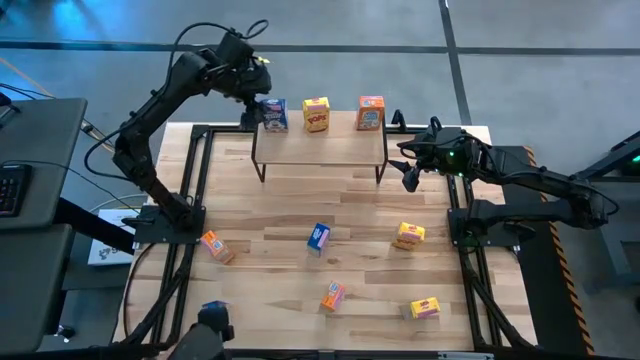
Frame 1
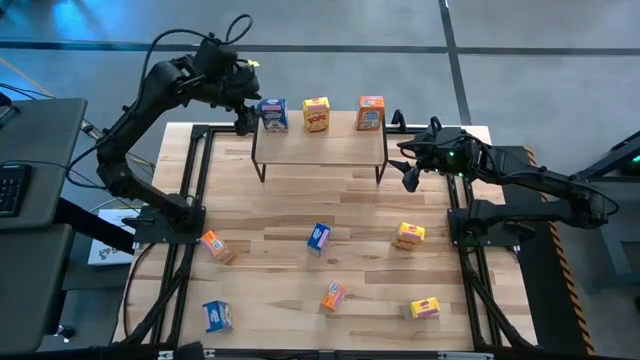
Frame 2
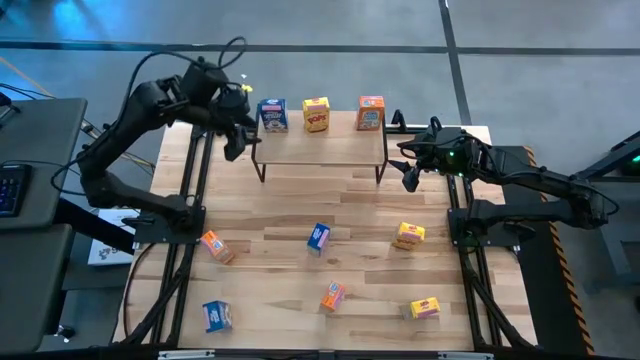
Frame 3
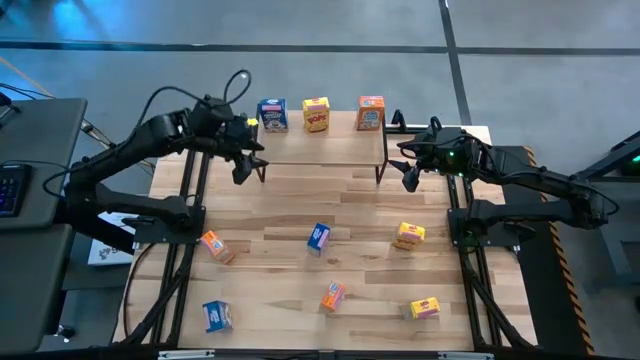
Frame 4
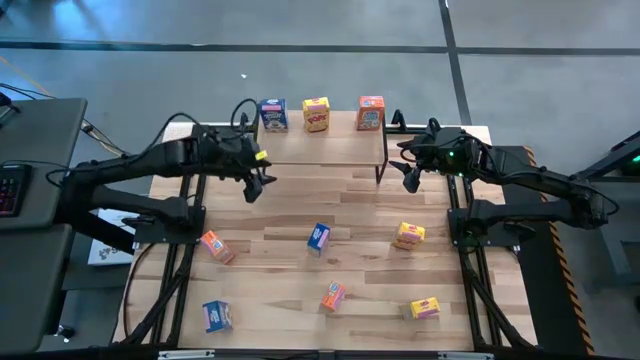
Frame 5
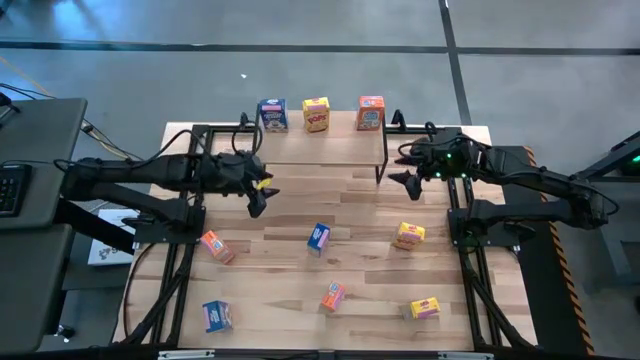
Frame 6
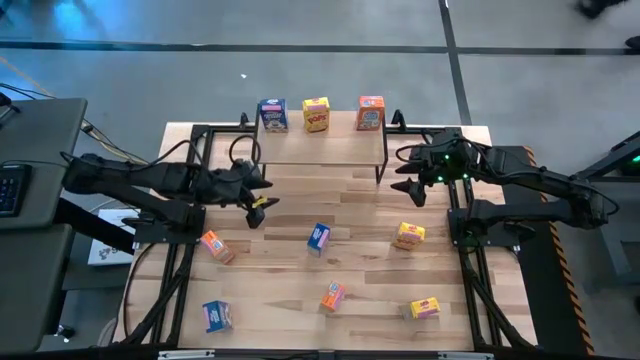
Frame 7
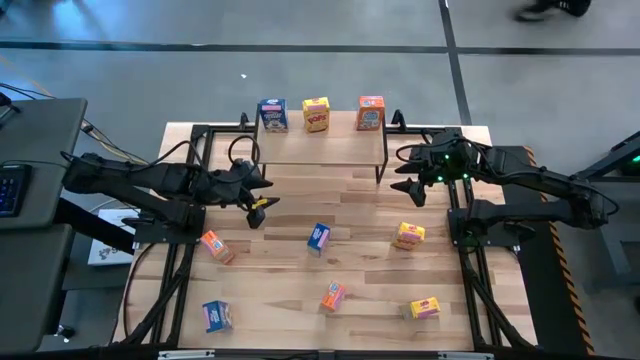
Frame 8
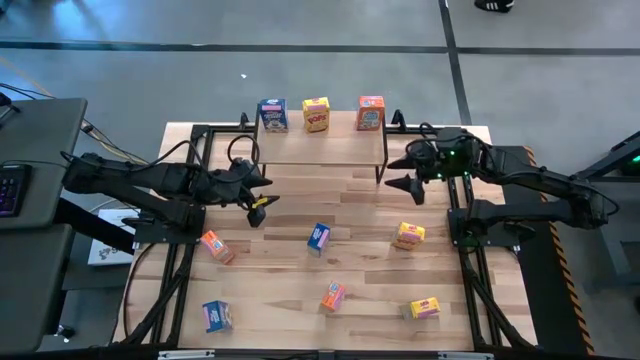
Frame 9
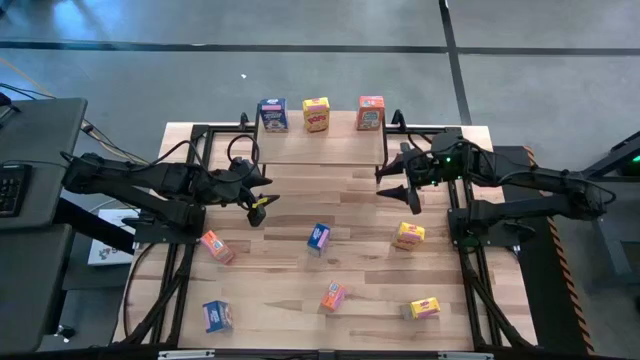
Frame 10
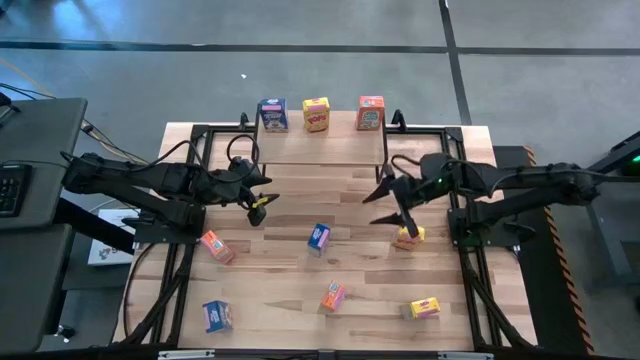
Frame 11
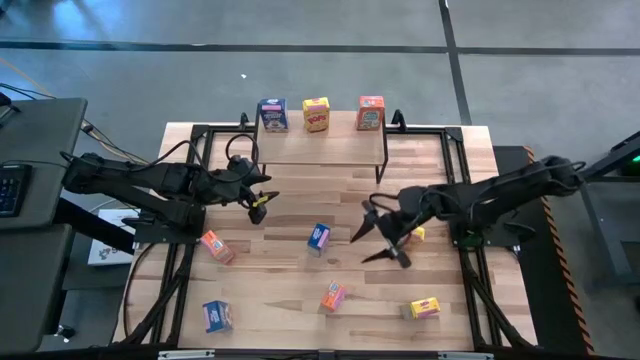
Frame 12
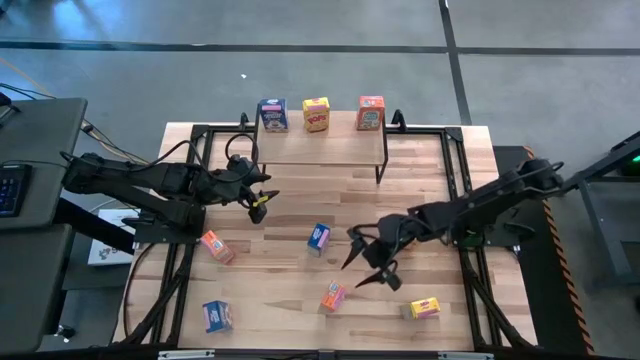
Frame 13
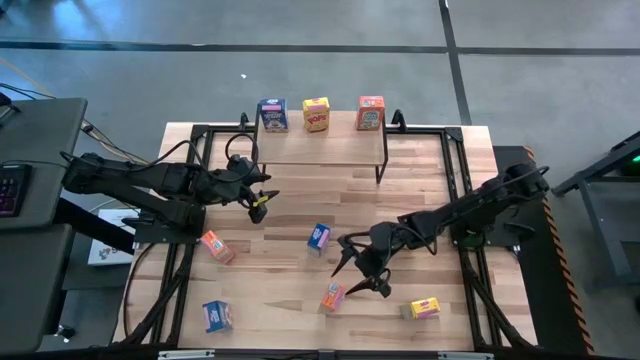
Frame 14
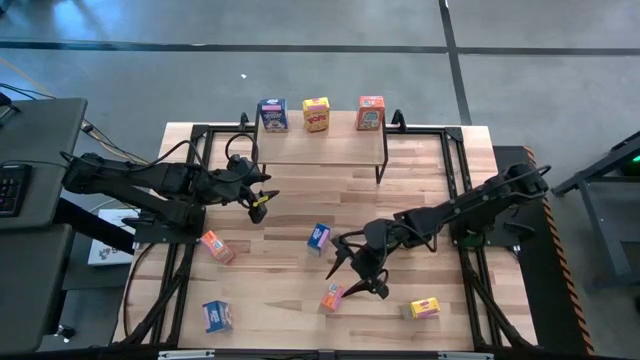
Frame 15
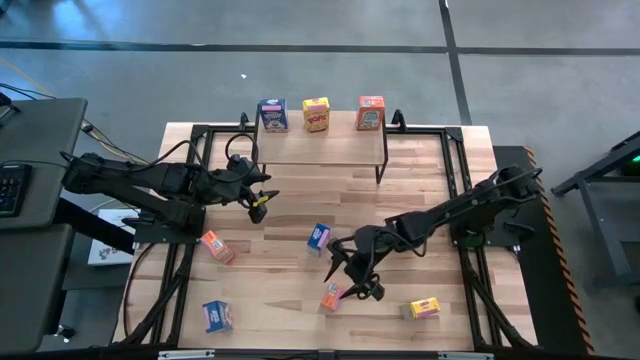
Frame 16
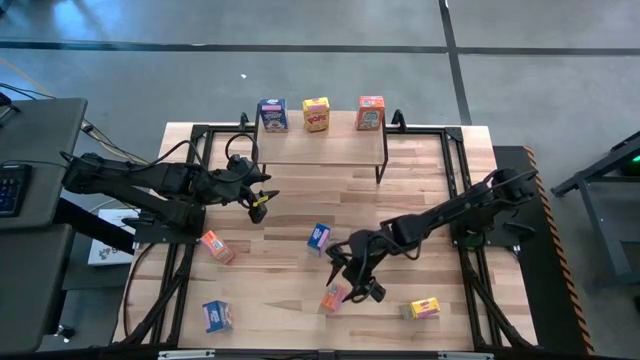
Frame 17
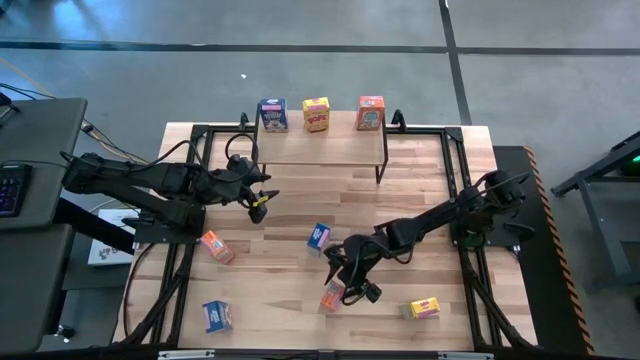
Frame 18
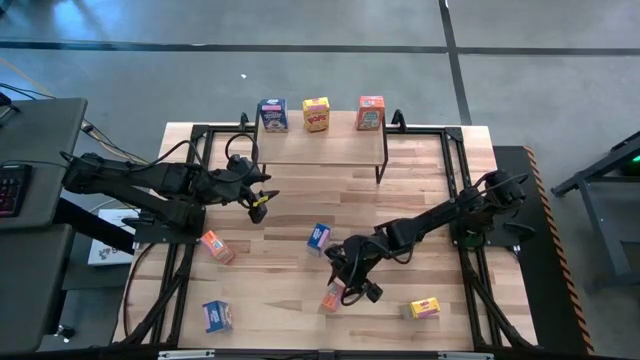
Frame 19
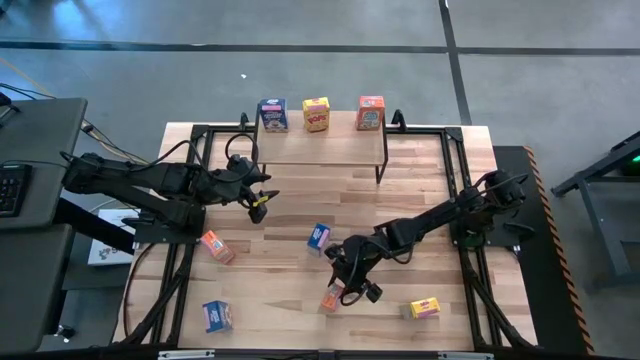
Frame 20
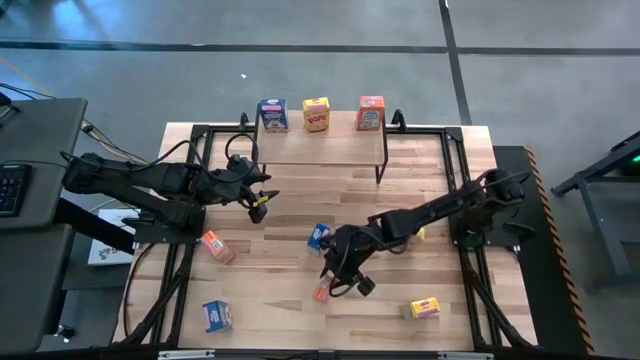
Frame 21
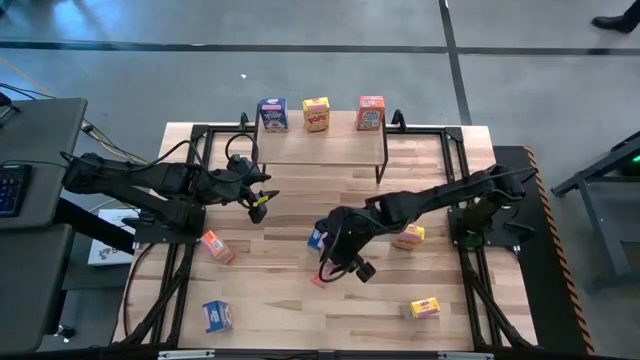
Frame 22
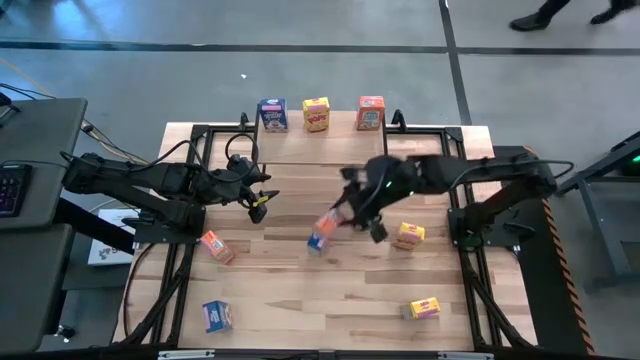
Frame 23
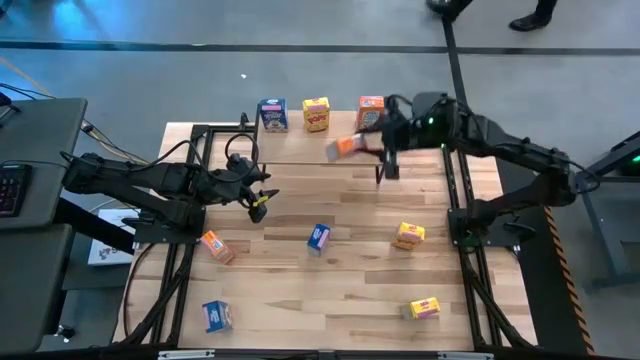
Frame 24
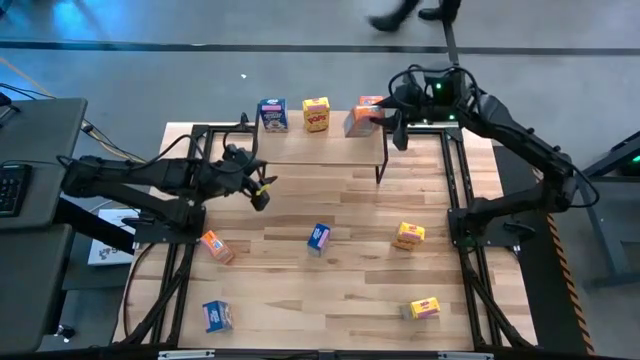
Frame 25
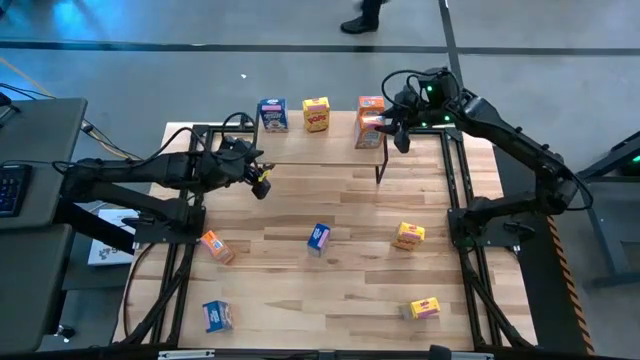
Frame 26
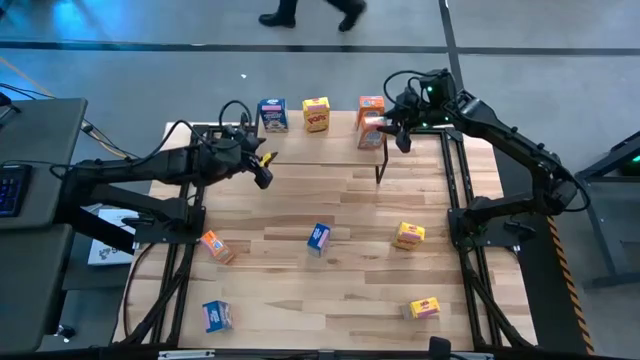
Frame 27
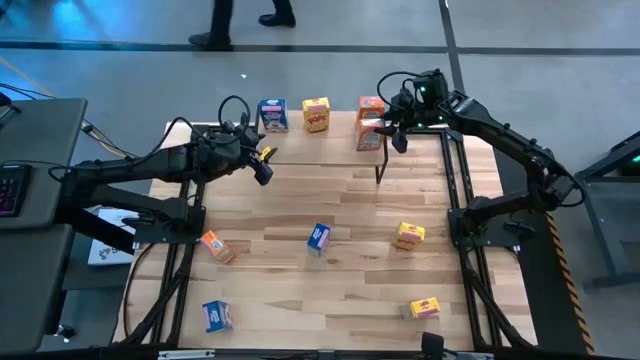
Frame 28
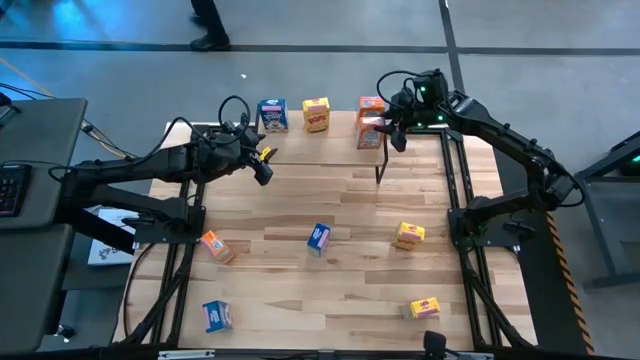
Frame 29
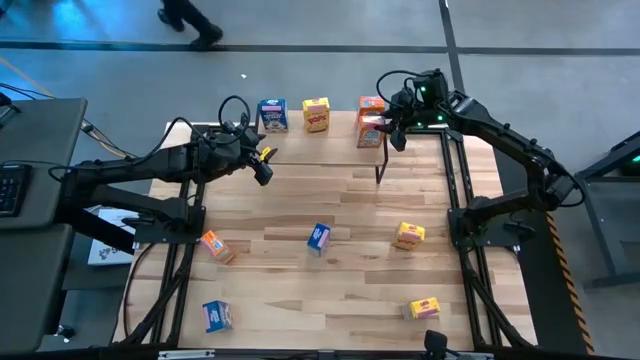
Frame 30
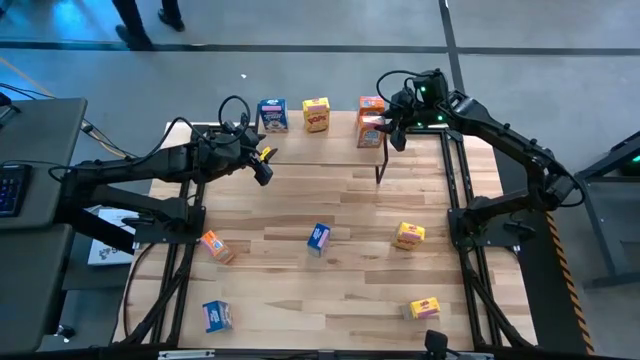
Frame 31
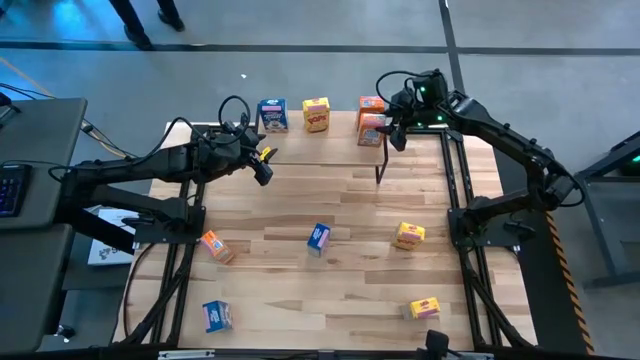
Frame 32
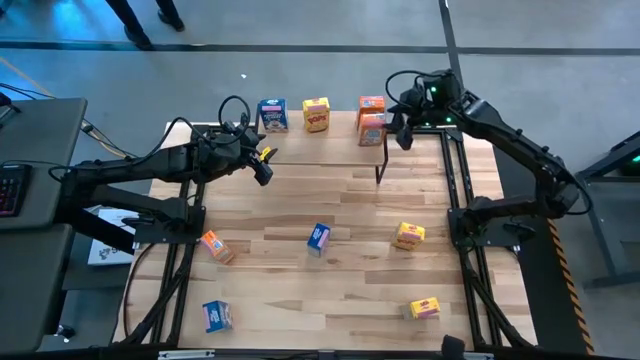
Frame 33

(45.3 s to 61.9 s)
Task: Stack cereal on shelf
Put the right orange cereal box and aligned with the other orange cereal box on the shelf

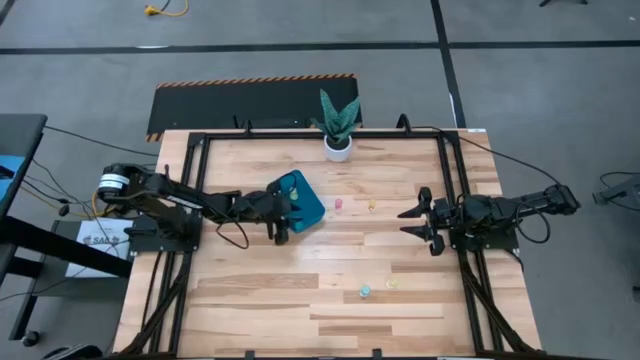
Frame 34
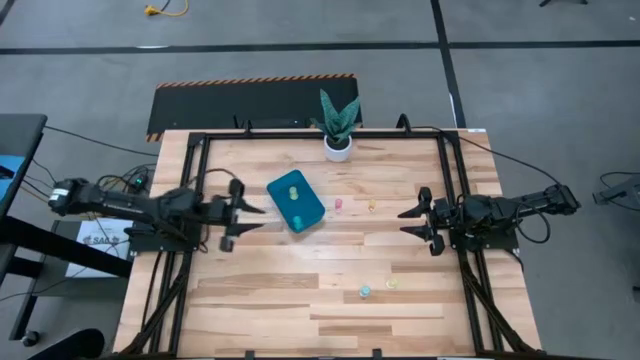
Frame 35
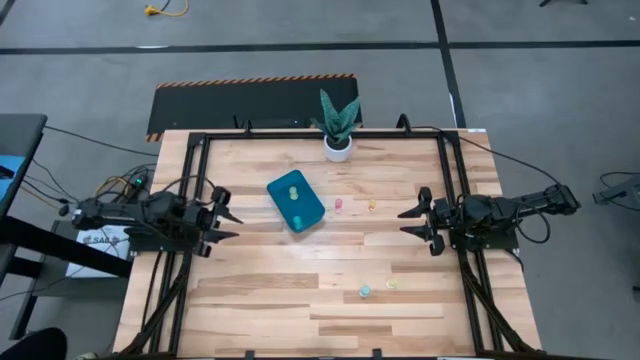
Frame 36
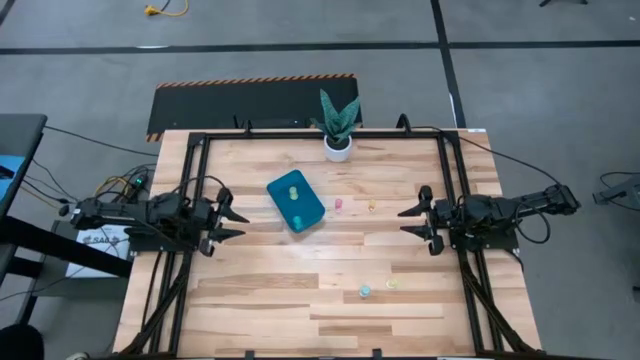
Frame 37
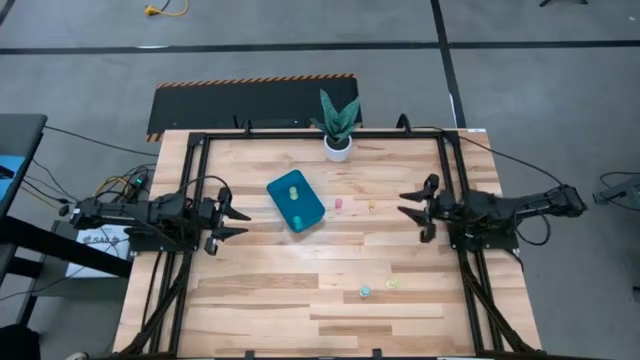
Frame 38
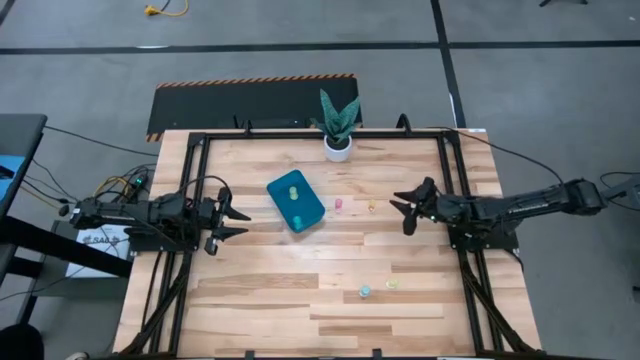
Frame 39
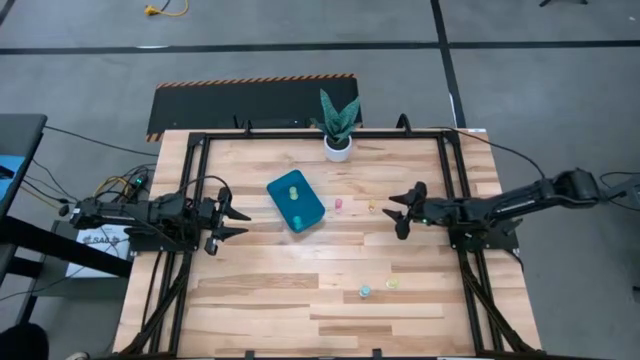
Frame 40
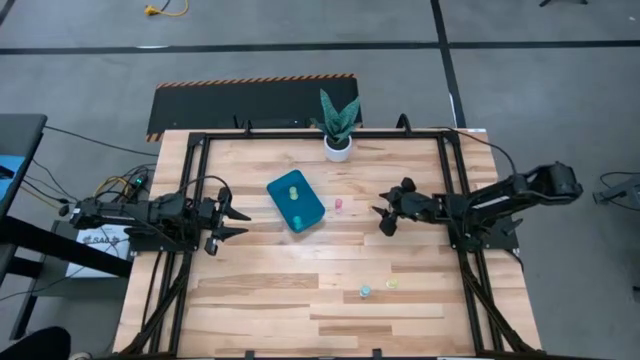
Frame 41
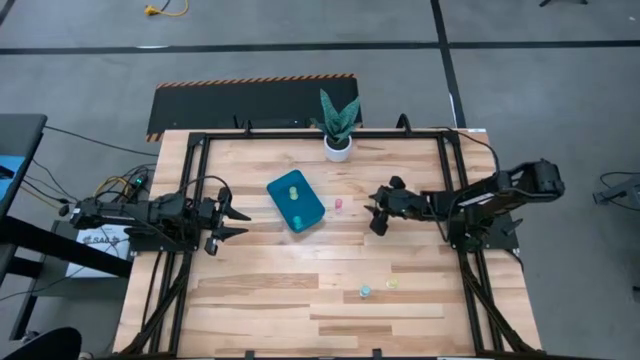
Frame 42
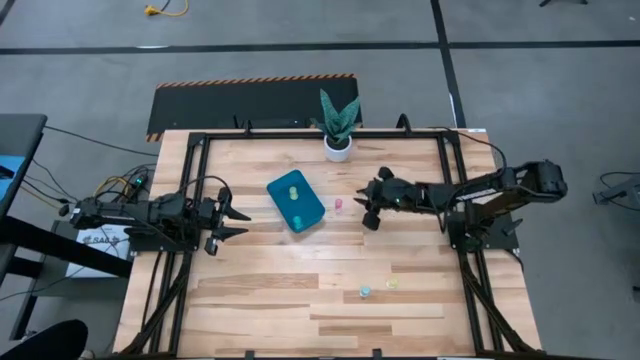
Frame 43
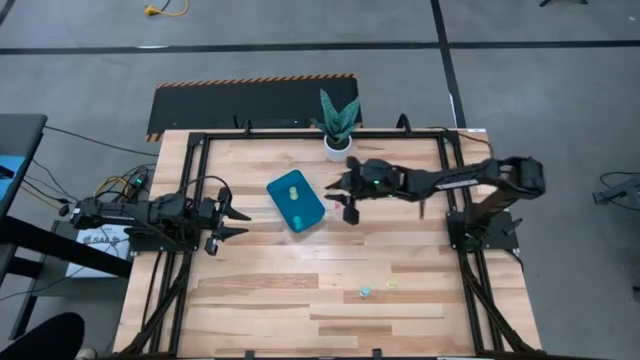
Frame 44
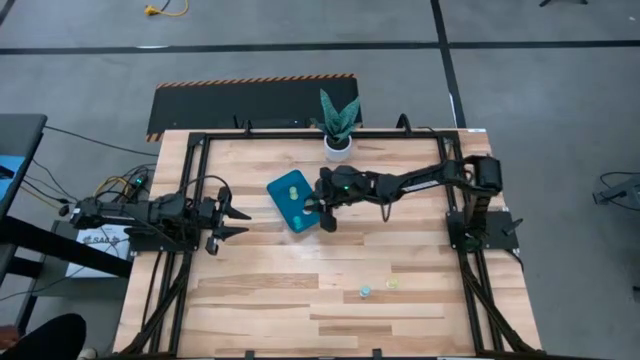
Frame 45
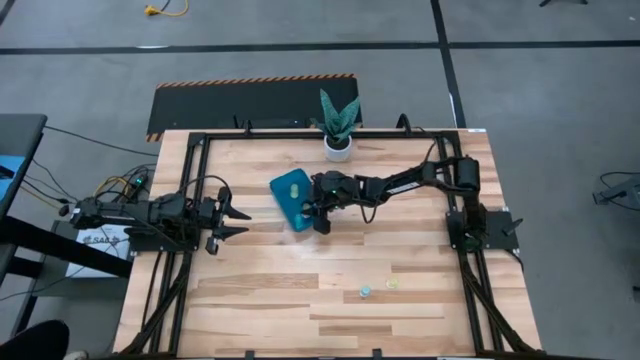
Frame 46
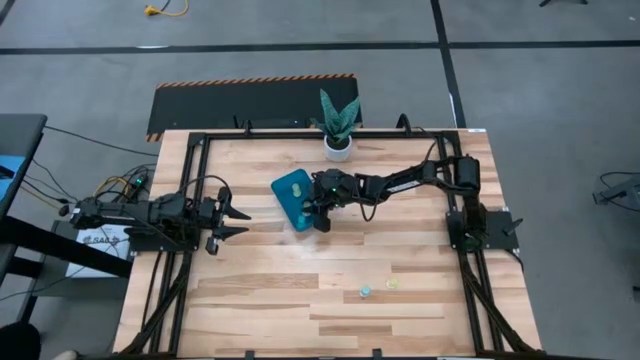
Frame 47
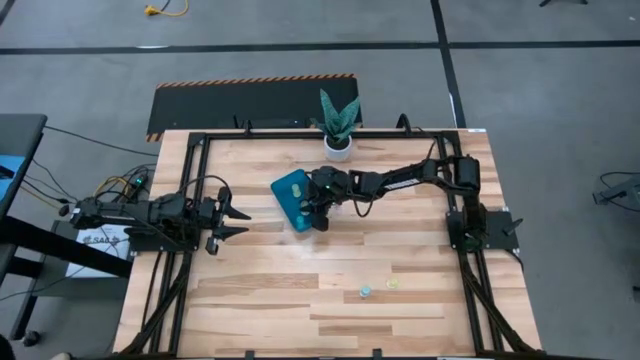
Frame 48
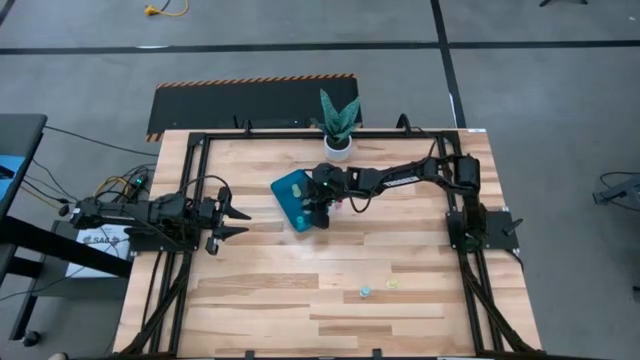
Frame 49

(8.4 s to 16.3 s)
Task: Pick and place pill bottles into a basket
Put the top yellow medicine bottle into the blue bin
